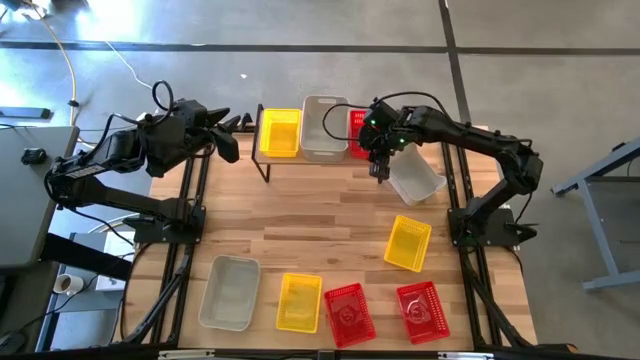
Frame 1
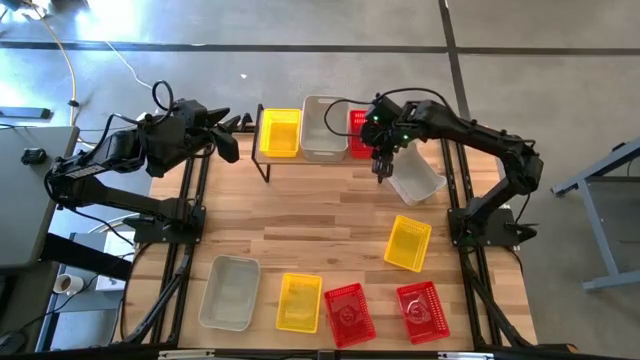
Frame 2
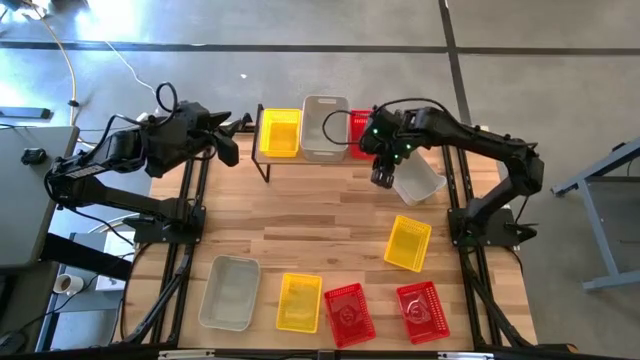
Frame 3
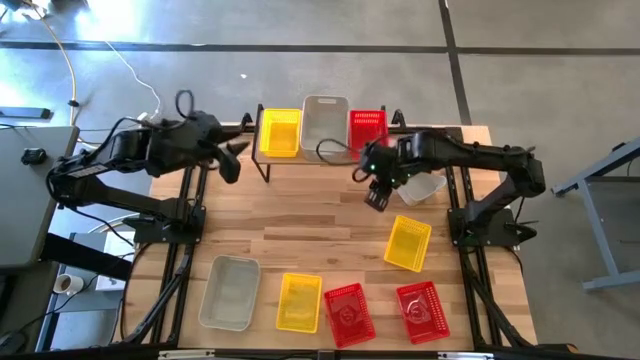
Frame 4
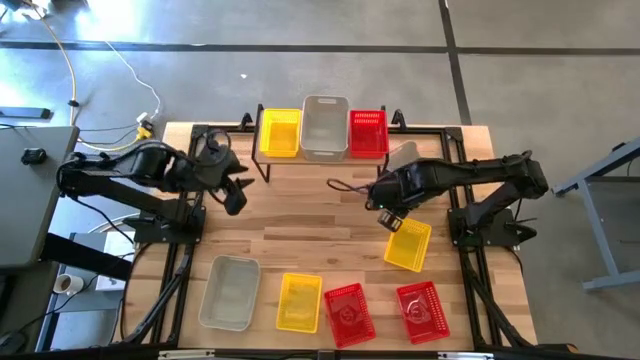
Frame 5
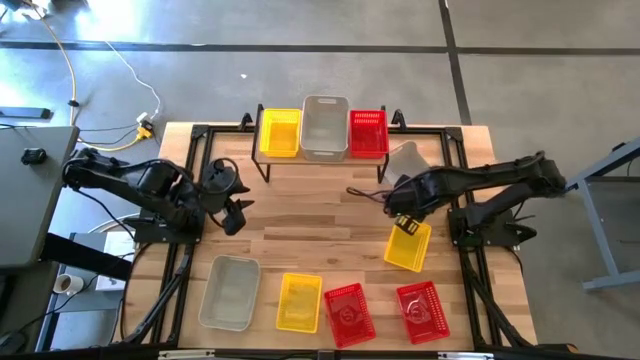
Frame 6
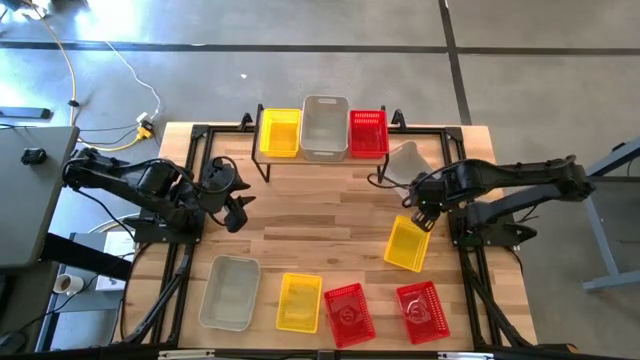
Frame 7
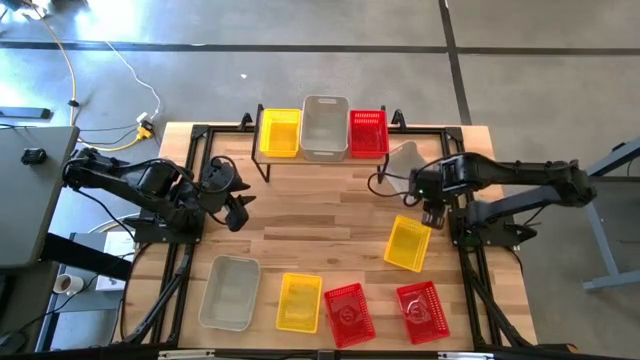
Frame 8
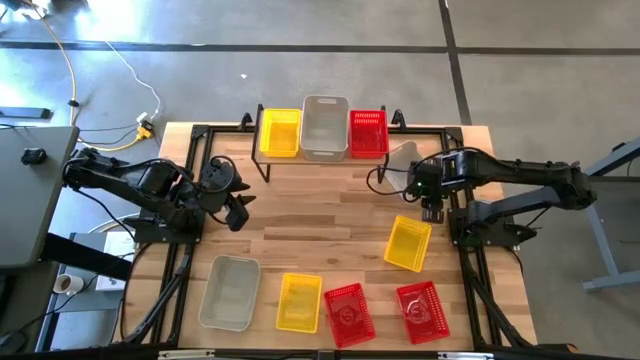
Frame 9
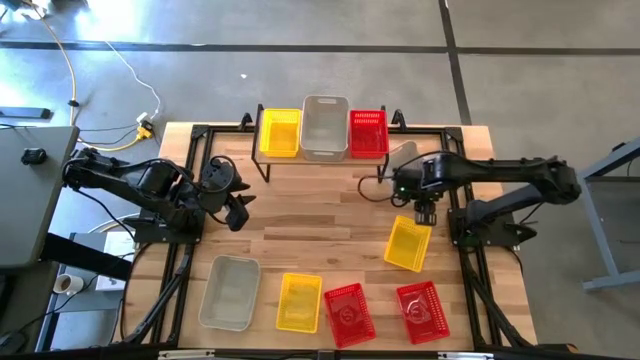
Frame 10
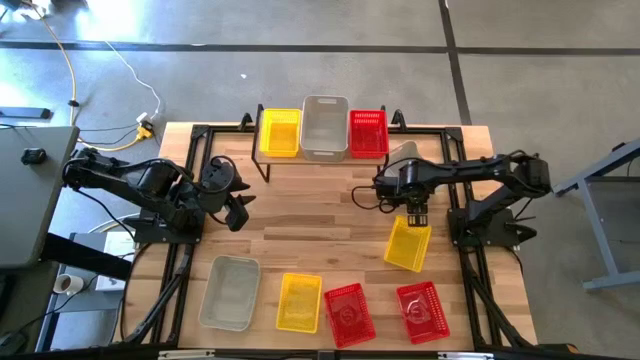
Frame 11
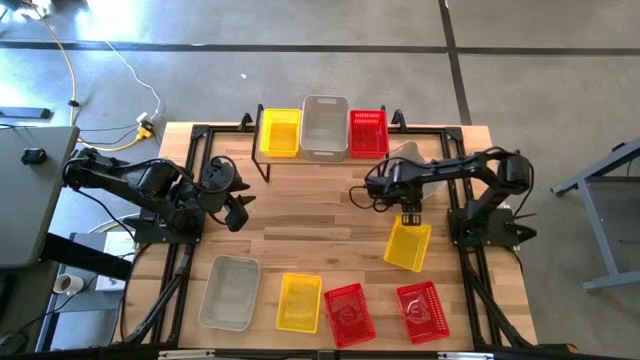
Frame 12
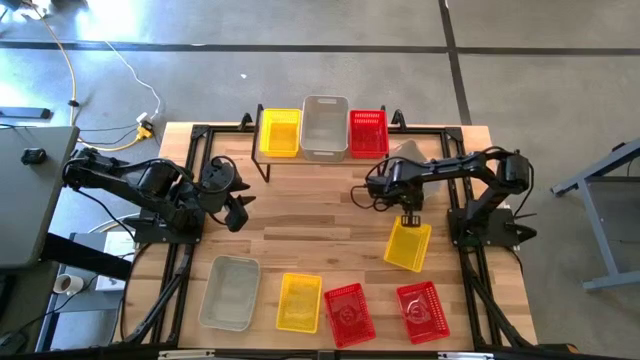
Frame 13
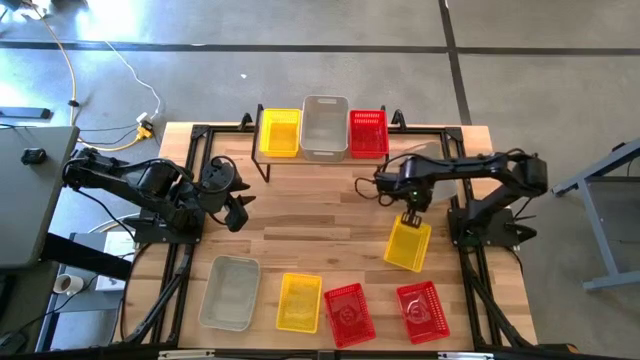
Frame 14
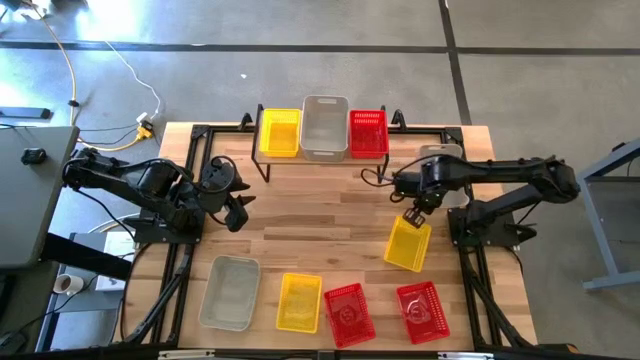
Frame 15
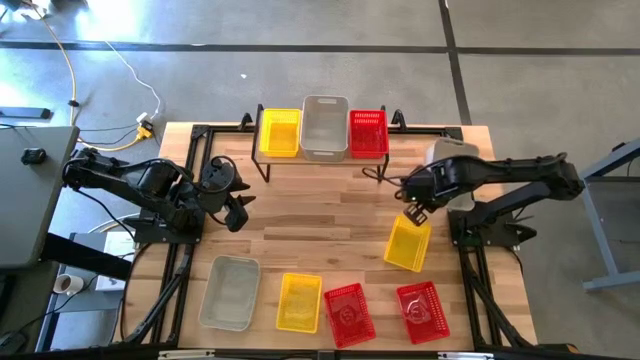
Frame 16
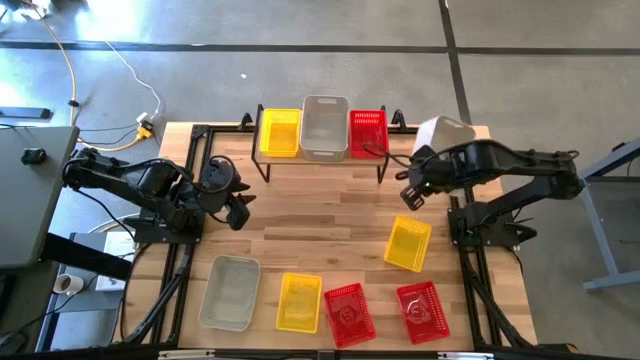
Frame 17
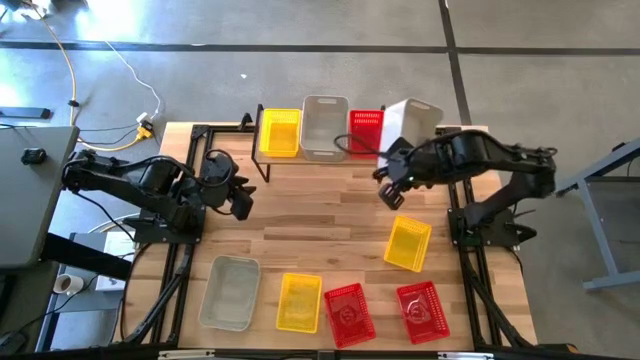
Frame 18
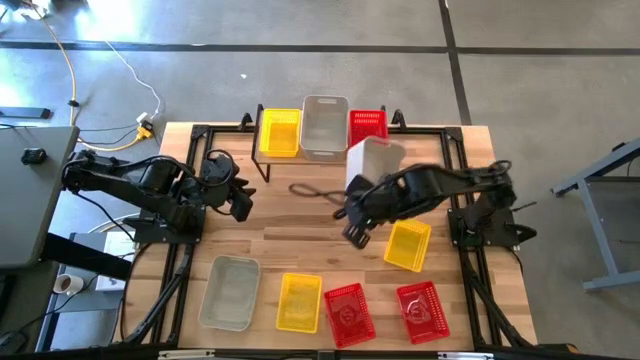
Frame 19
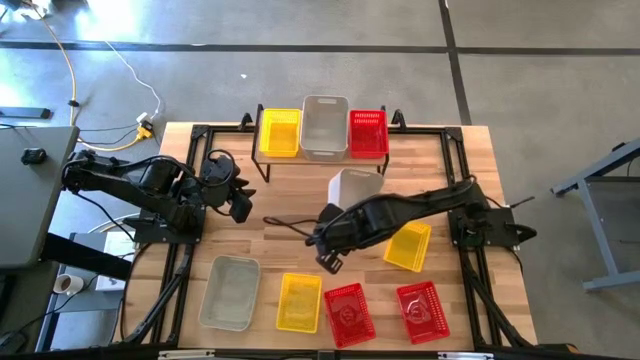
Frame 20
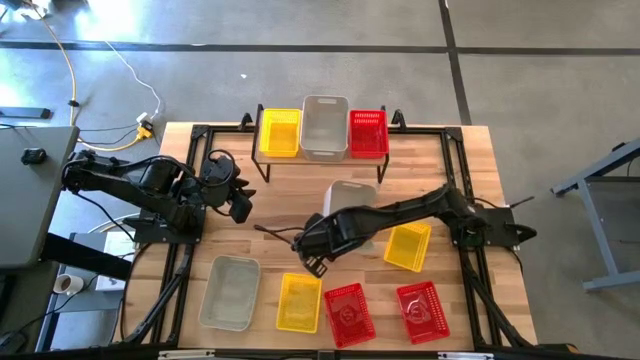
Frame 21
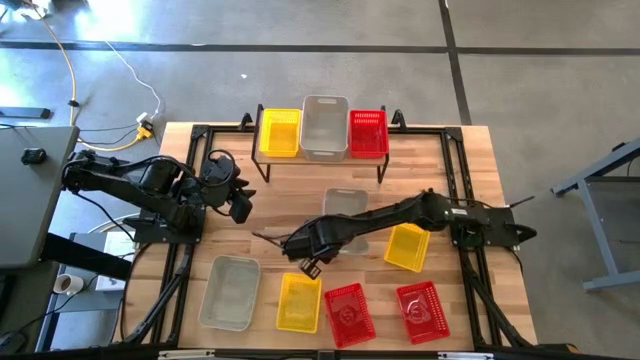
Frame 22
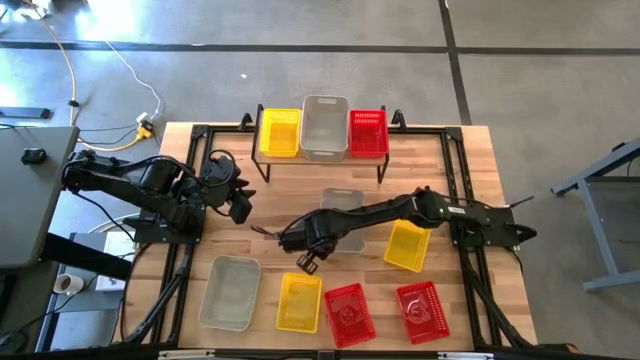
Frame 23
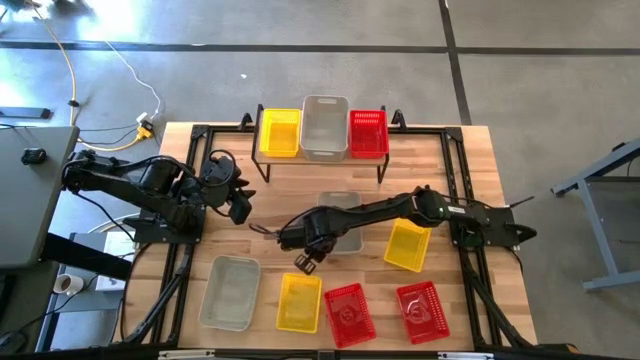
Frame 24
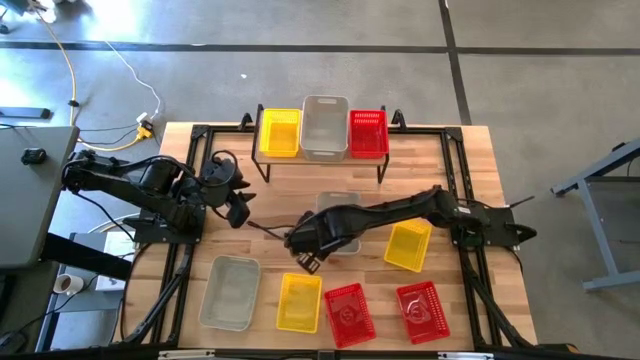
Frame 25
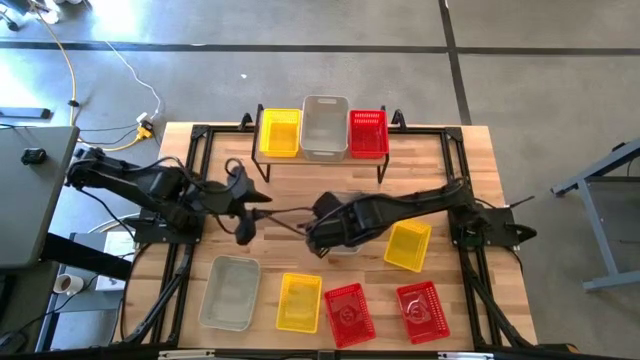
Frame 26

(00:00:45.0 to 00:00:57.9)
Task: Stack baskets on shelf by color
Stack the top gray bin on top of the gray bin on the shelf

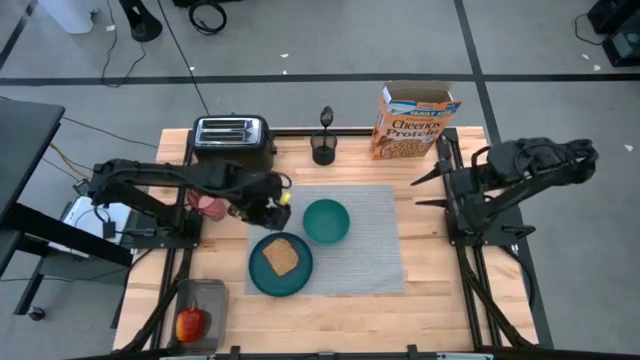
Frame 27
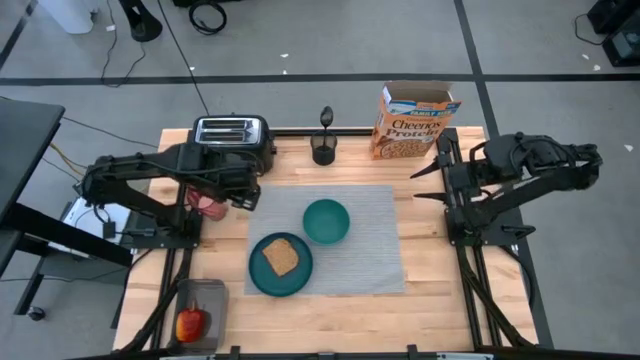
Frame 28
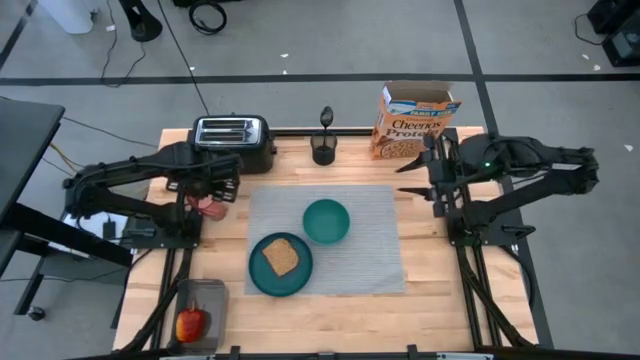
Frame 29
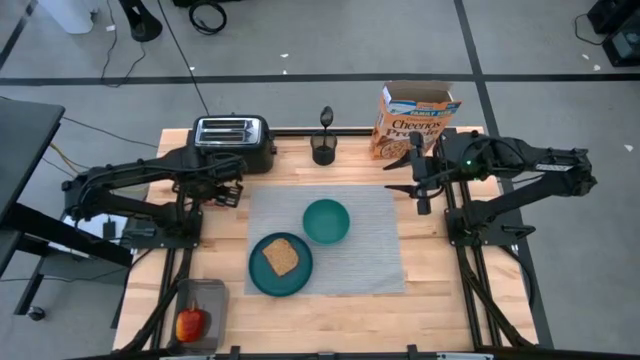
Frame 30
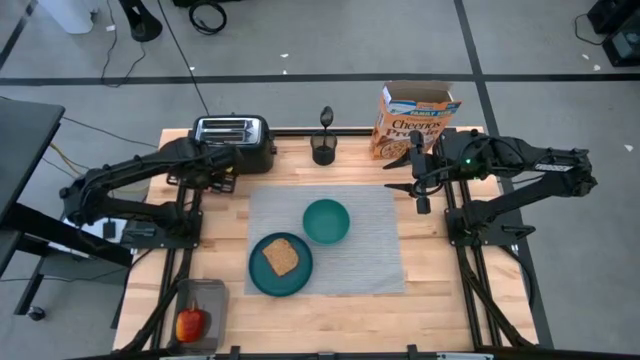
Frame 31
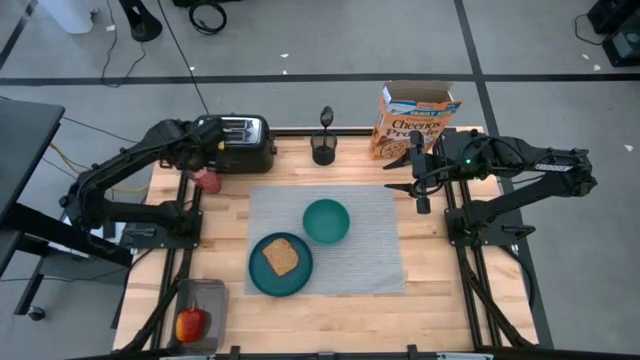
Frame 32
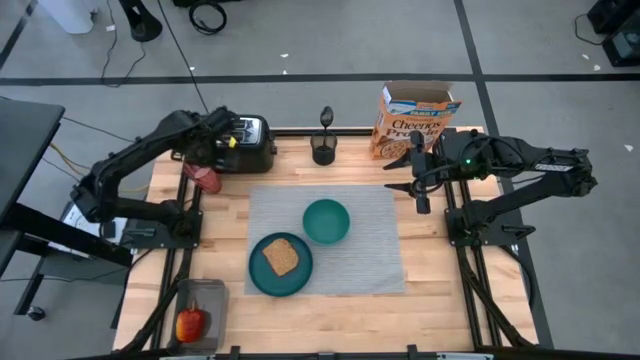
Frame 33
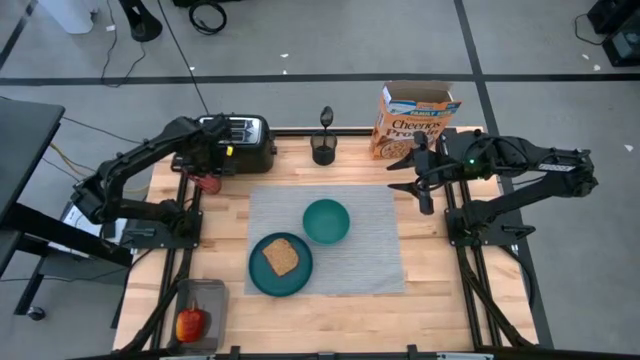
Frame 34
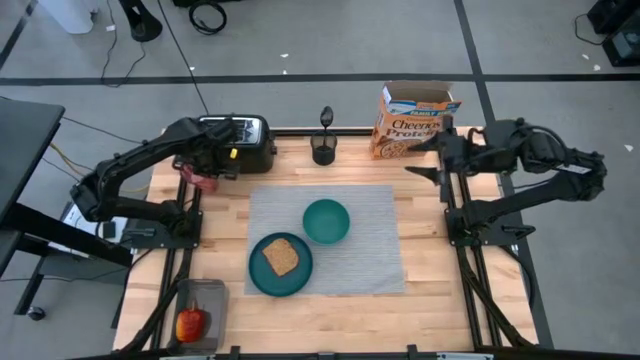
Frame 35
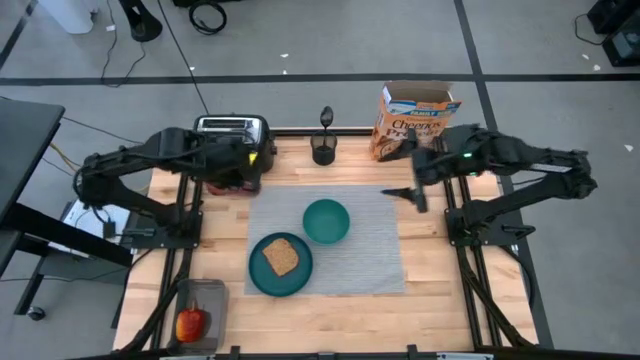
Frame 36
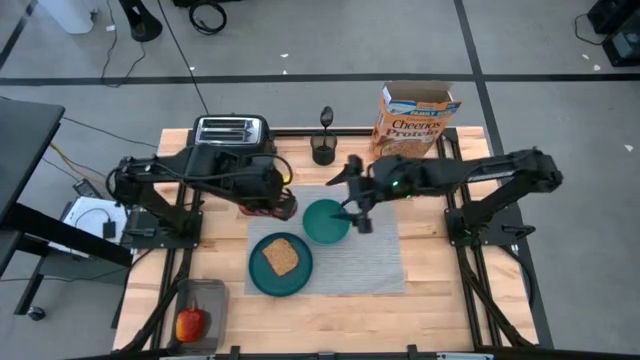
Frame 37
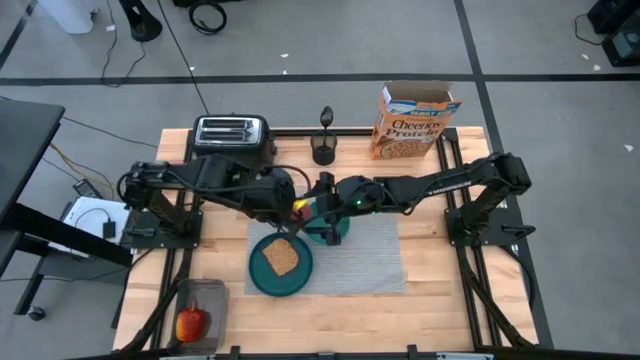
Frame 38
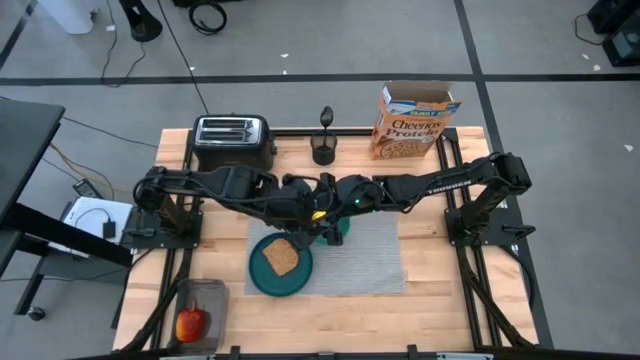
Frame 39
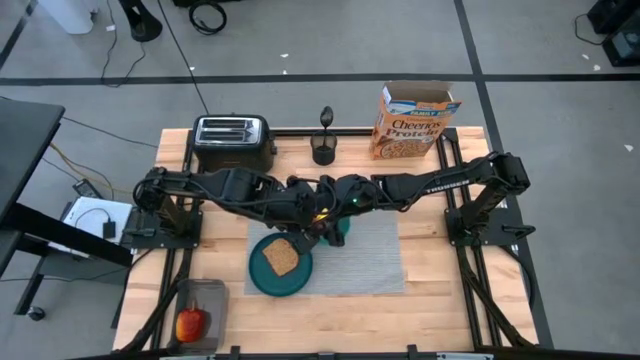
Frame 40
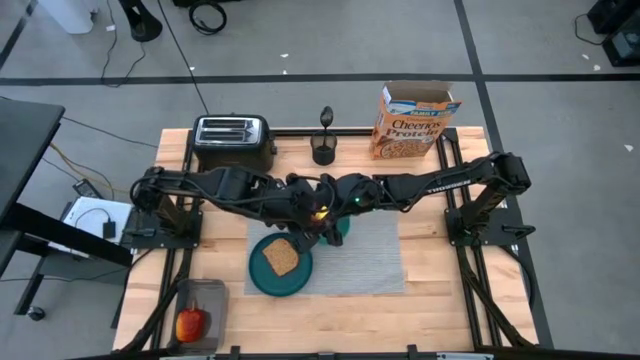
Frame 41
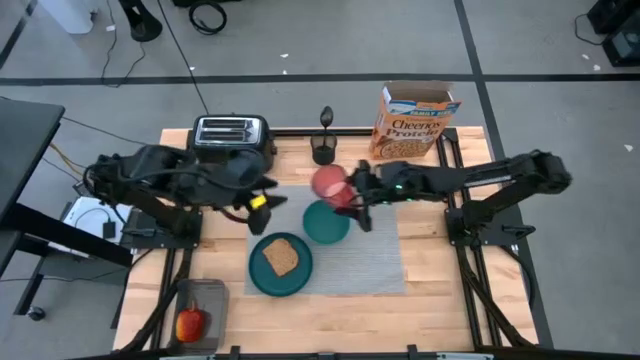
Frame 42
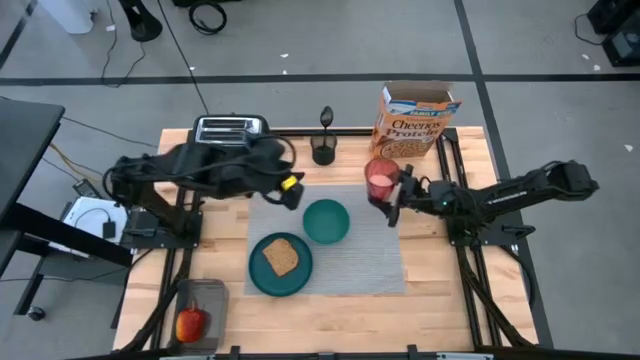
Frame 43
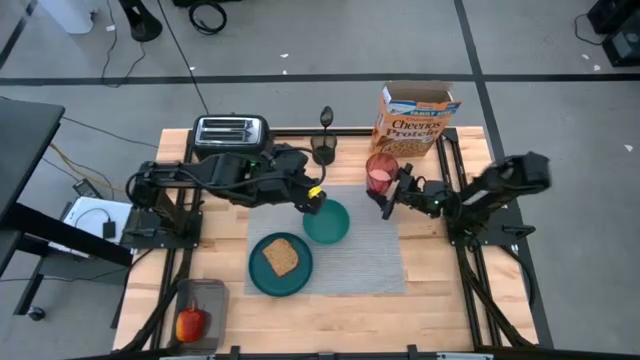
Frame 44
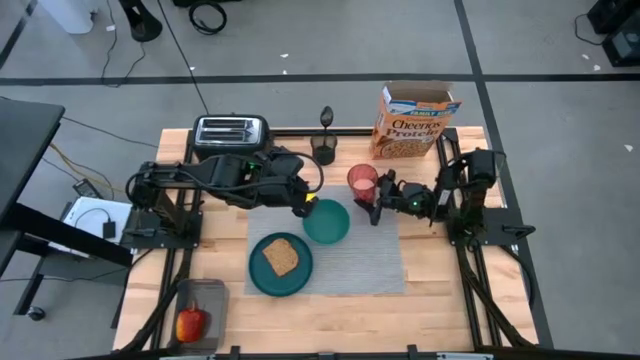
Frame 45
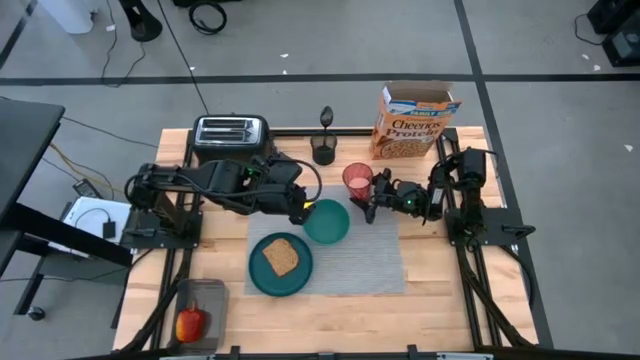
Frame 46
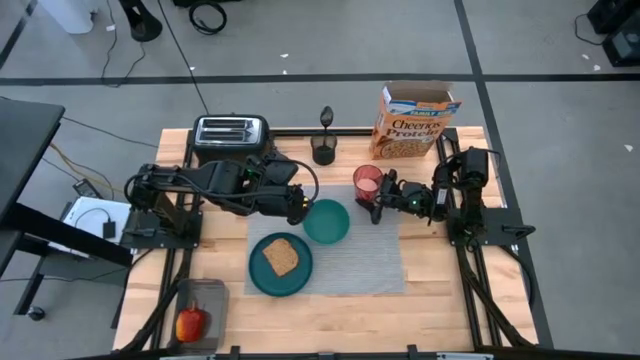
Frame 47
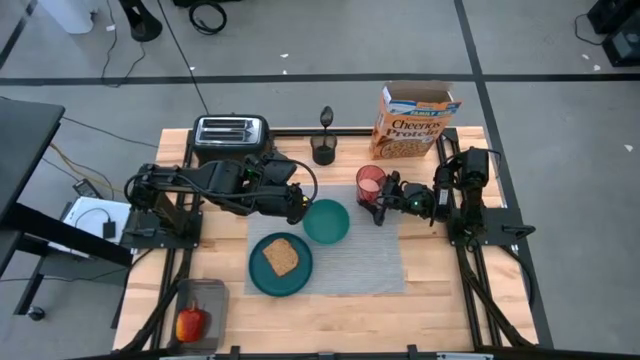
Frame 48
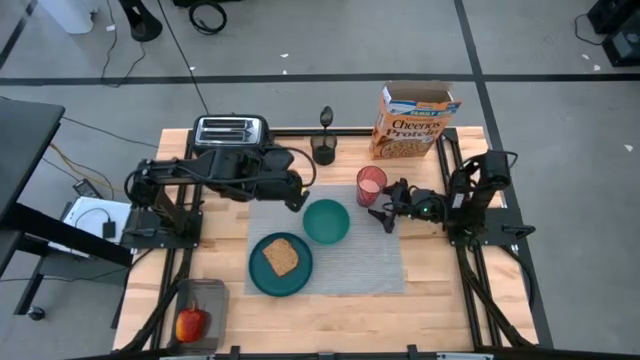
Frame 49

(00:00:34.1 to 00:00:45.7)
Task: Arrange a breakfast setting
Put the red glass on the gray placemat to the top right of the dark green bowl
